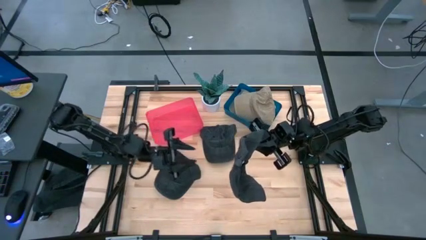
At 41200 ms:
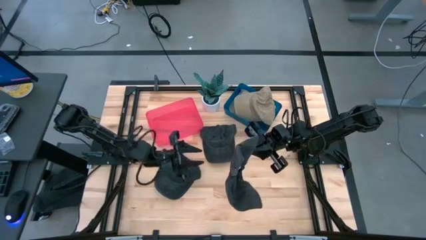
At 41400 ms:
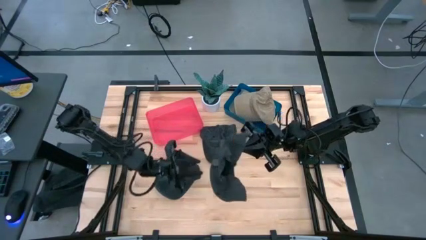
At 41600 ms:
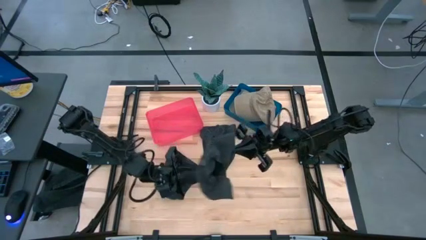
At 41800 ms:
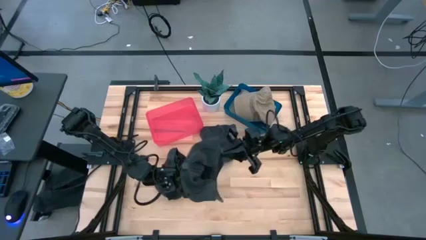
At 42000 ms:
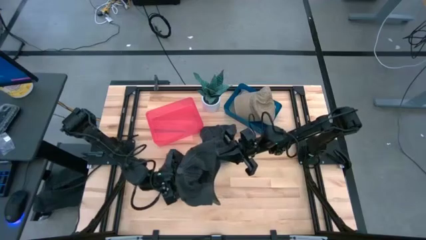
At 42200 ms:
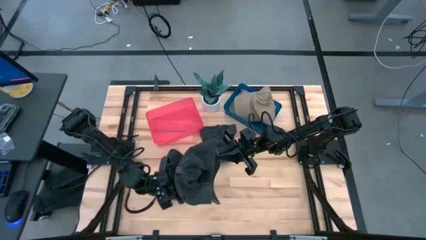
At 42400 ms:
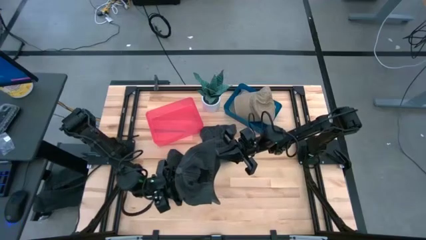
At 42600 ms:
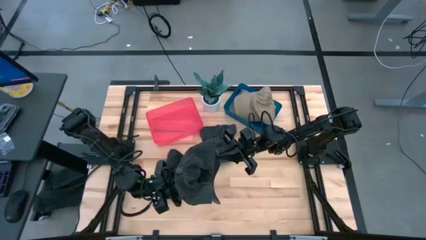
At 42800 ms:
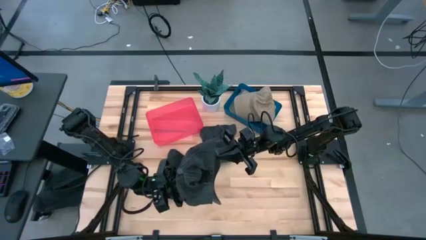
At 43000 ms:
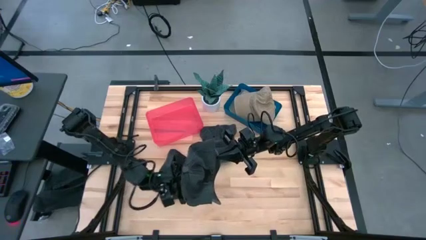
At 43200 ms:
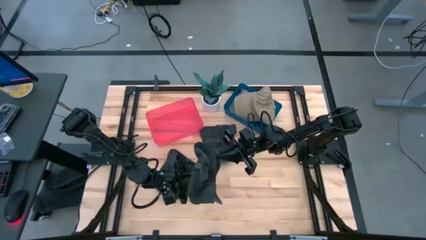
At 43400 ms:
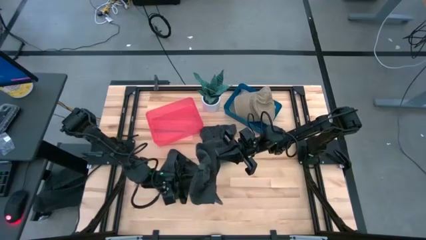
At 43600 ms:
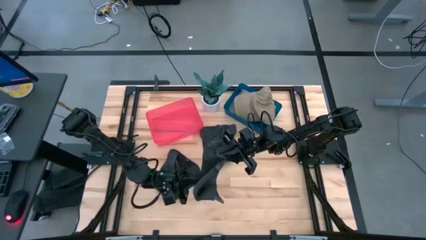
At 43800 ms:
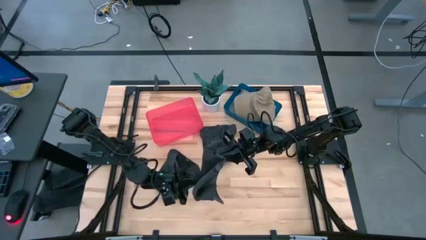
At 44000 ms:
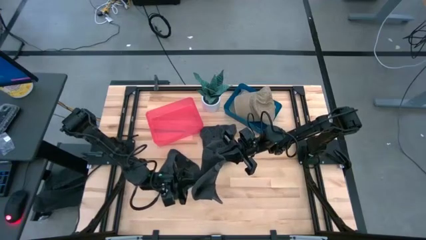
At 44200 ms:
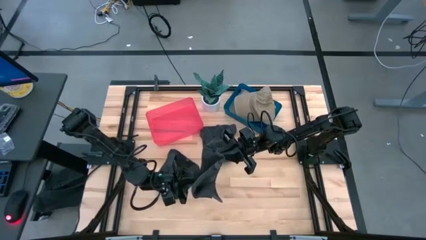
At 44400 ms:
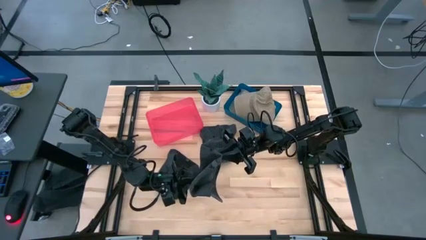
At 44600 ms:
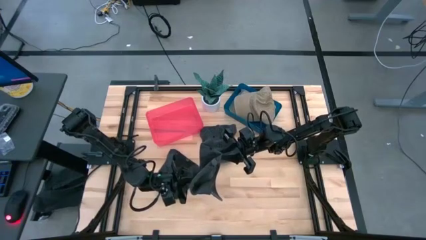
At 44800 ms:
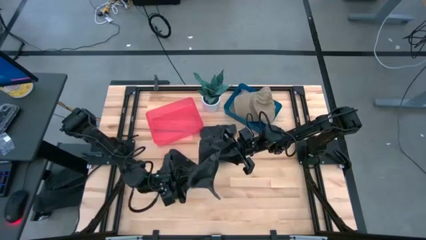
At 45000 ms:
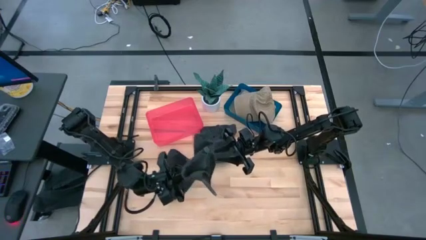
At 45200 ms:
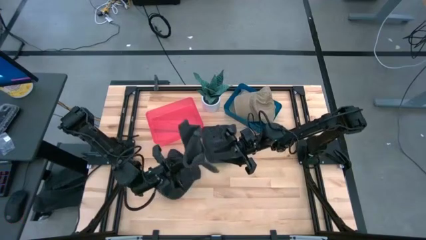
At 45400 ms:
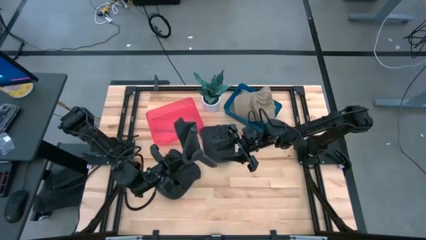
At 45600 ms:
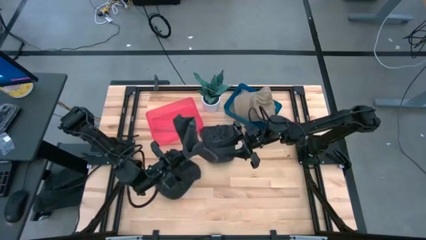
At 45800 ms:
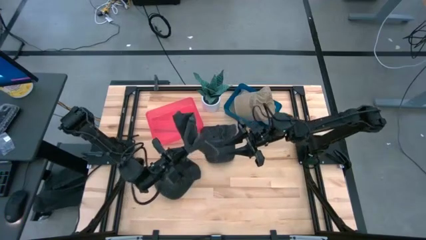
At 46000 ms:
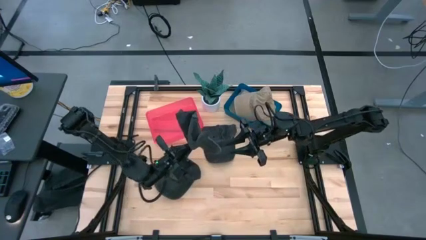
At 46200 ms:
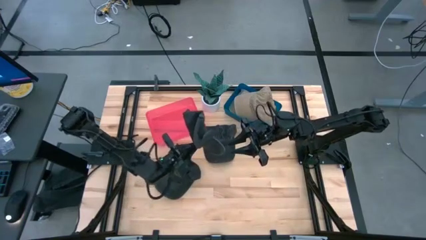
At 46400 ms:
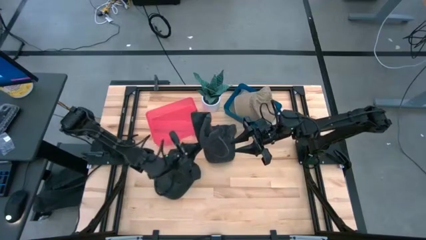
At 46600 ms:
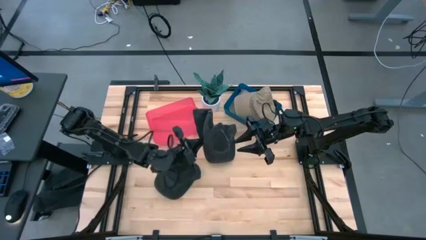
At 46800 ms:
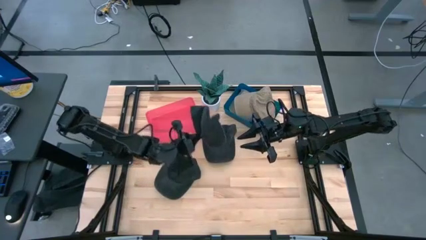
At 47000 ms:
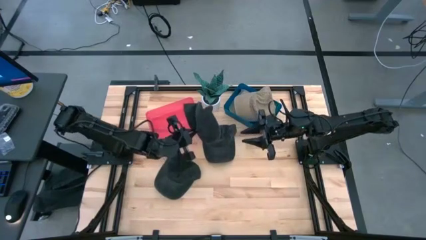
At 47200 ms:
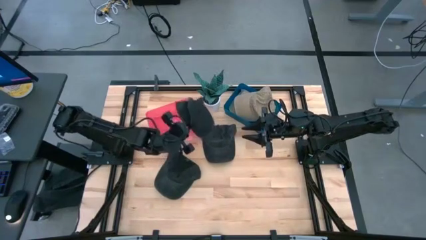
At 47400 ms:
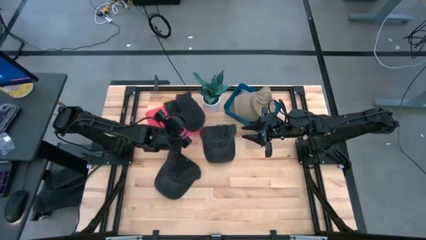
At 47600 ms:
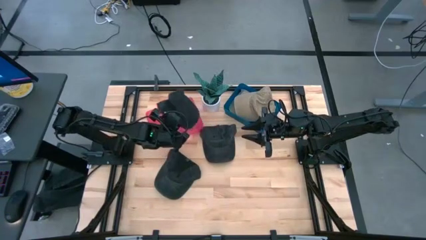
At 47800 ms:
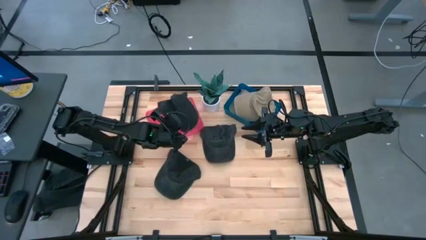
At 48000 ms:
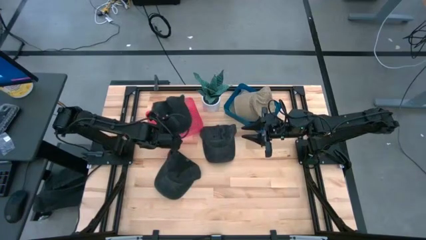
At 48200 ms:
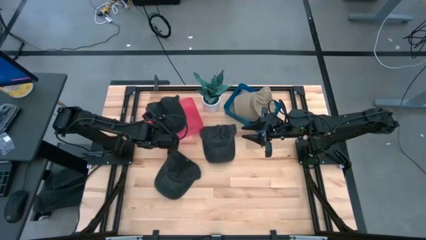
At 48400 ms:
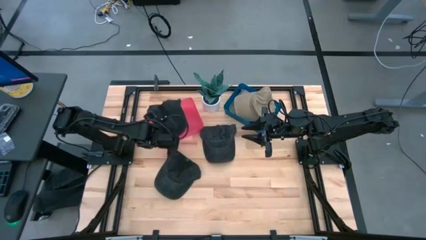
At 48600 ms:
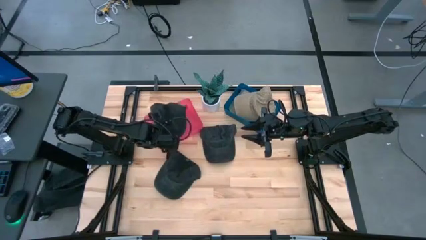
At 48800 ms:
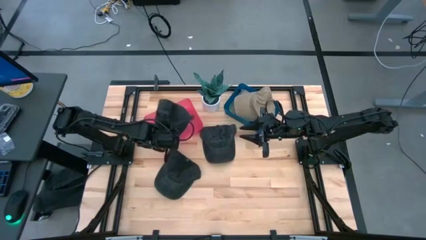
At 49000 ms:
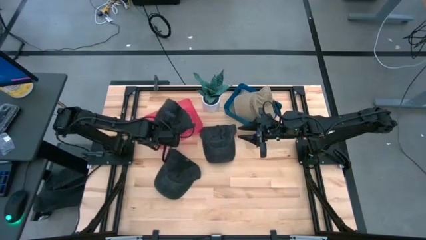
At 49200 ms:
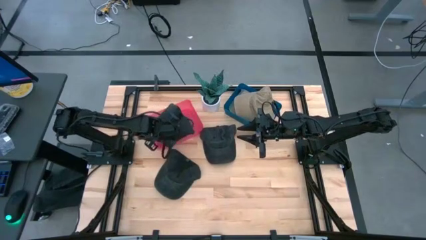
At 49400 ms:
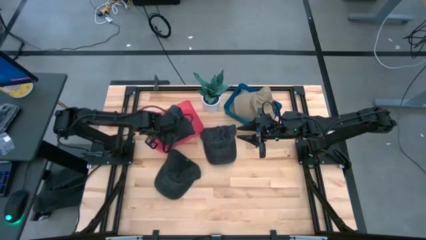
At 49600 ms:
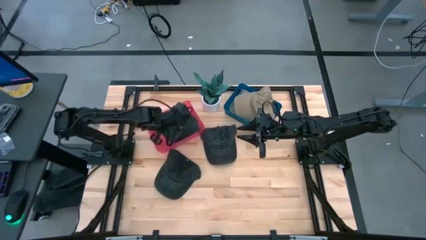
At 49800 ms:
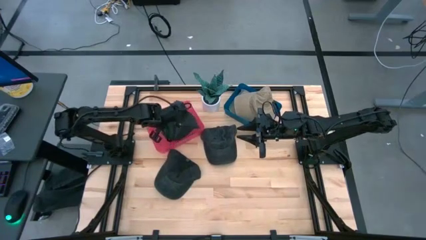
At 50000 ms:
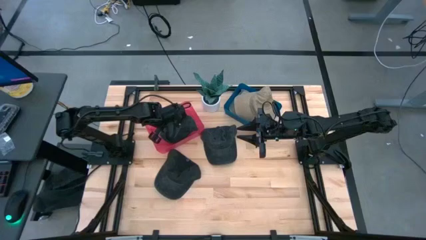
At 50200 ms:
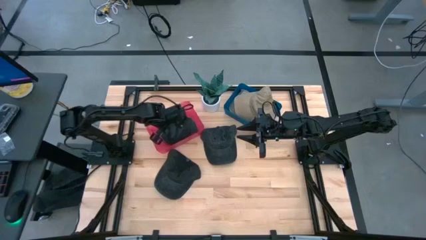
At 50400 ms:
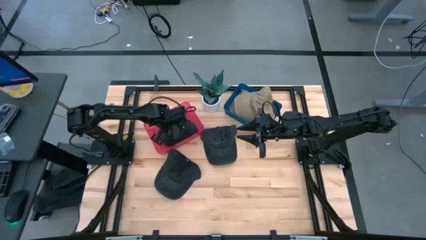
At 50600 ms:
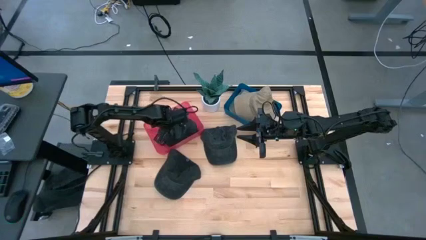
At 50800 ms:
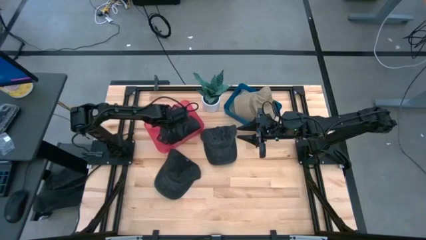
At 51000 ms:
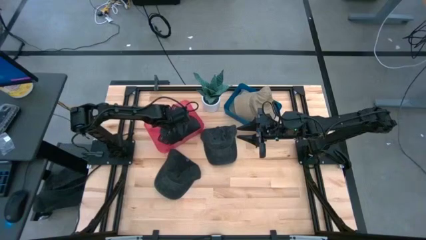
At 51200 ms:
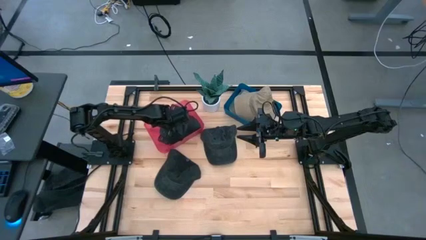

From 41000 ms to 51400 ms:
Task: Pick & Place hat
Put the right black cap into the pink bin

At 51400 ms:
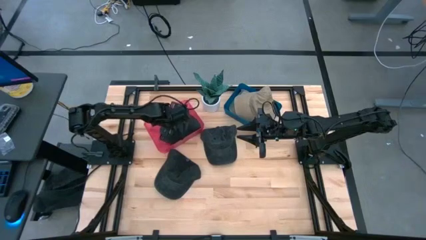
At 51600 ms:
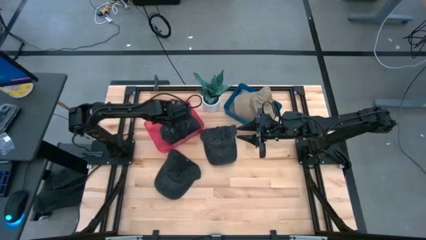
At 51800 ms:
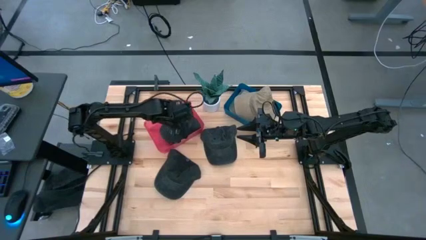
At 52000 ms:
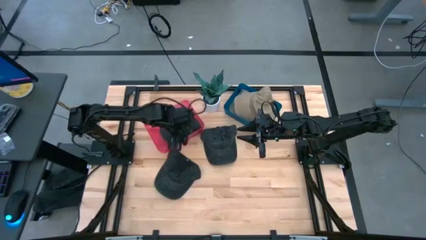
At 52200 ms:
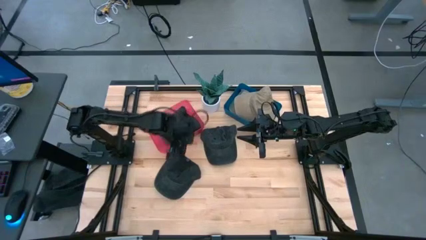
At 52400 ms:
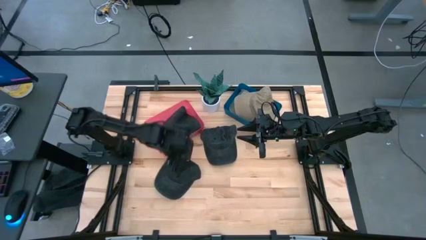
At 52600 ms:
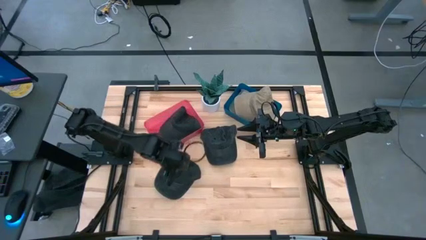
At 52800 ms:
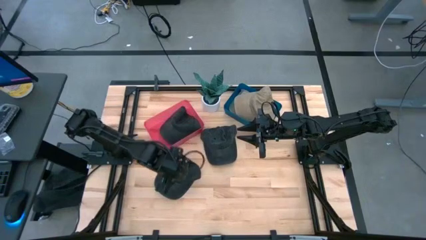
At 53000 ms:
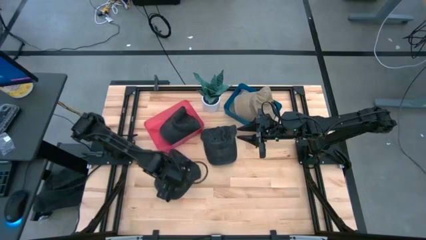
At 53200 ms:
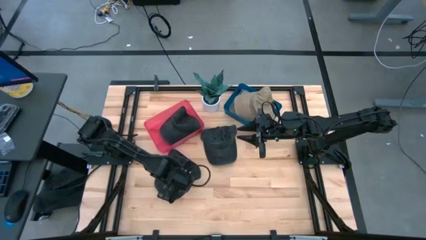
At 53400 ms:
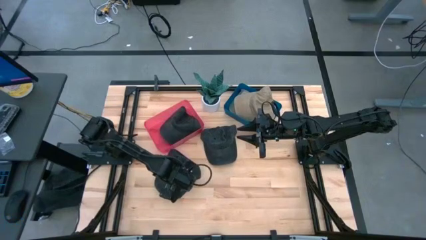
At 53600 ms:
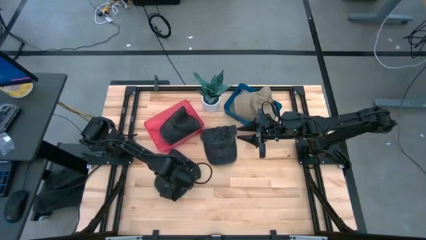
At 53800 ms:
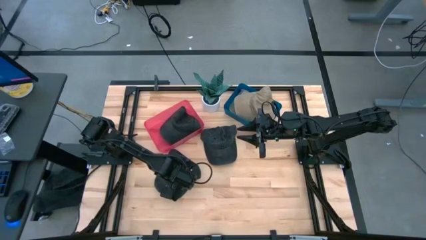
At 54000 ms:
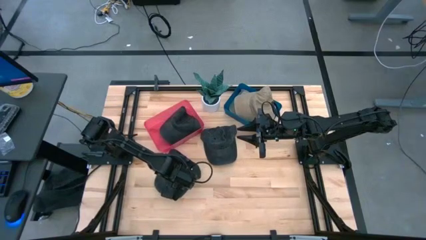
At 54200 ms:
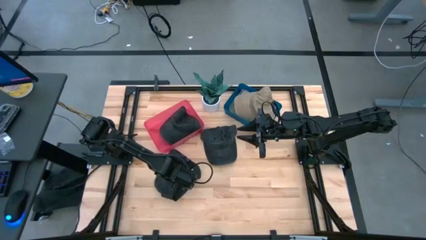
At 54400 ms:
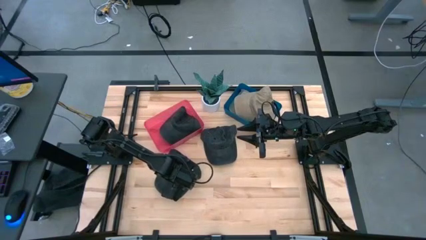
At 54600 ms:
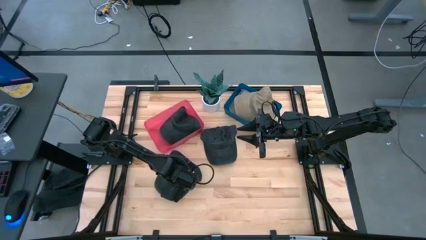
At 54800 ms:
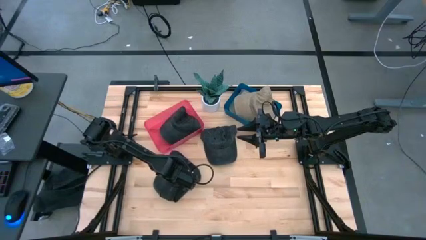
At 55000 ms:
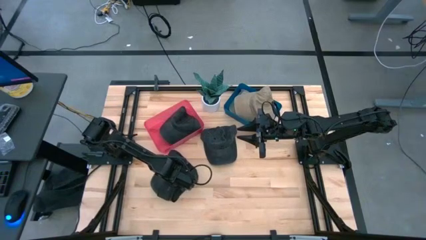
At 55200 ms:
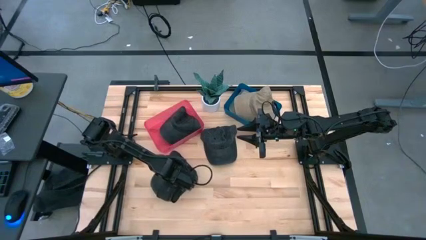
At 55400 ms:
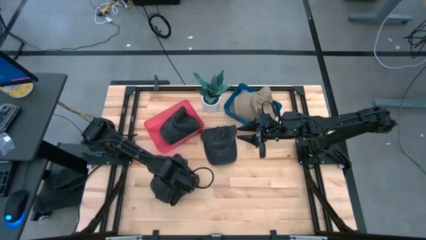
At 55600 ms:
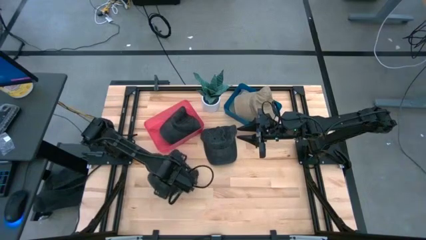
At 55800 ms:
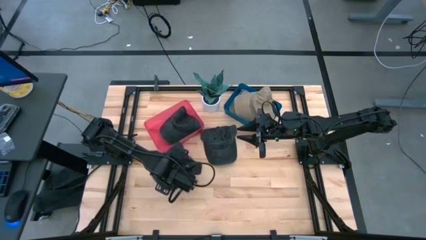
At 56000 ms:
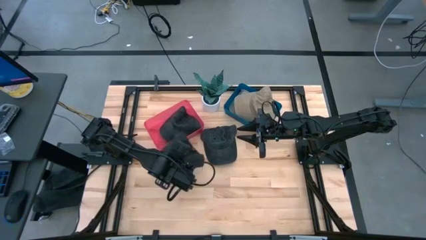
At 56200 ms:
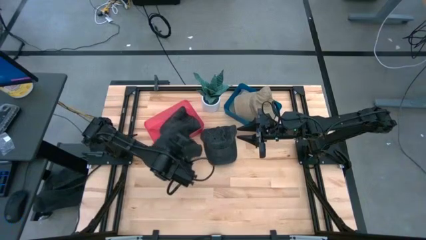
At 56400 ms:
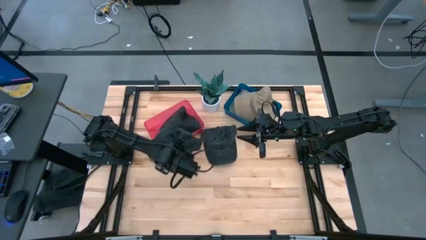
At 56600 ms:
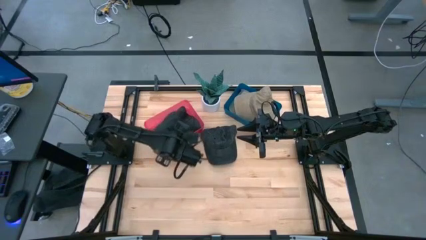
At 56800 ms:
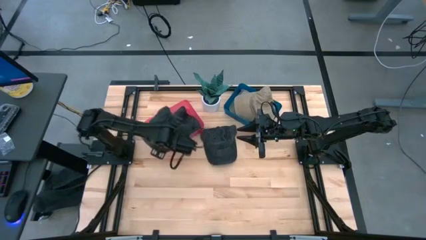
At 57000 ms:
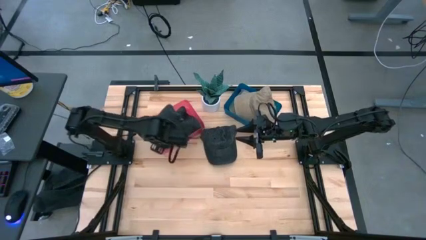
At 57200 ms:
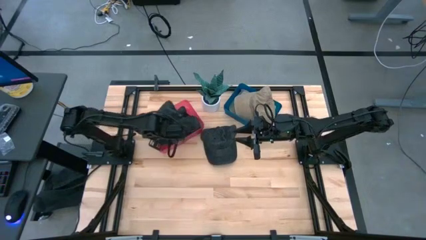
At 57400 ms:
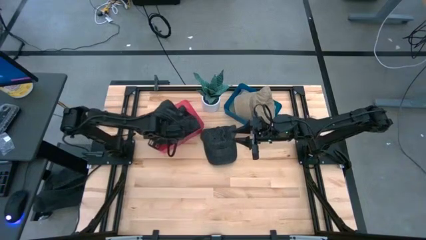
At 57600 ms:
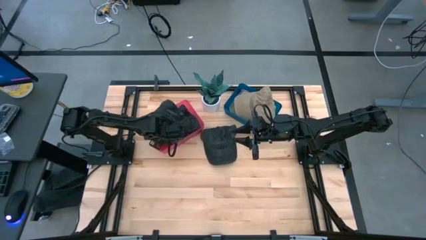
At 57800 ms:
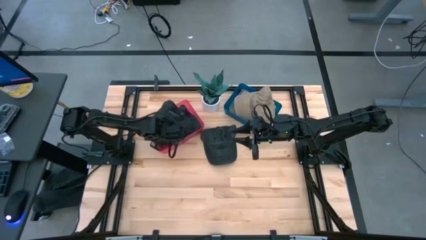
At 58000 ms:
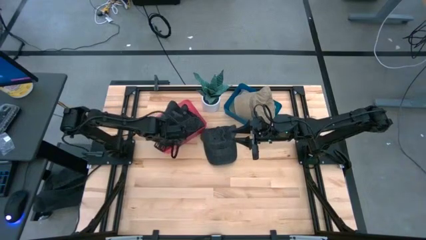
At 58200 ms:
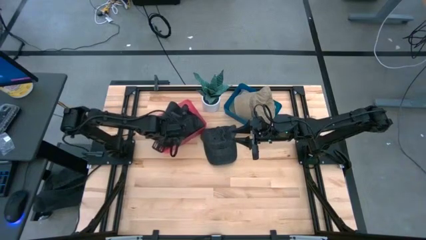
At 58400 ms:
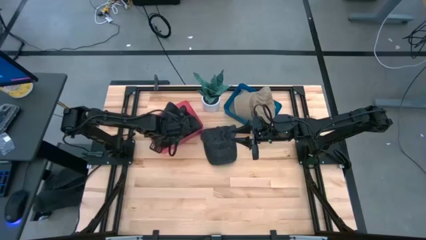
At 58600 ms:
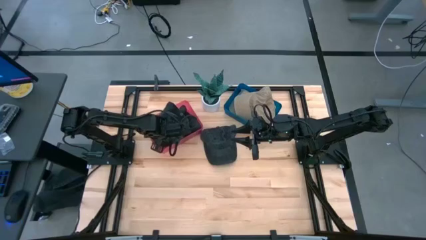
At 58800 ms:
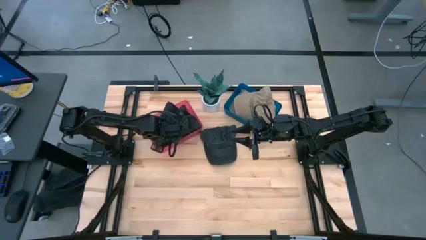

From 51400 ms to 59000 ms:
Put the left black cap into the pink bin
